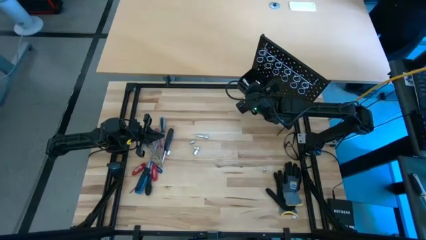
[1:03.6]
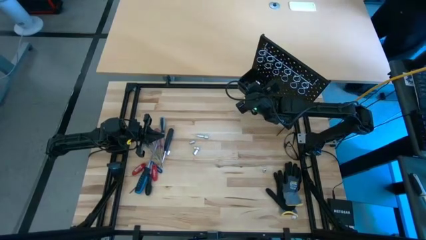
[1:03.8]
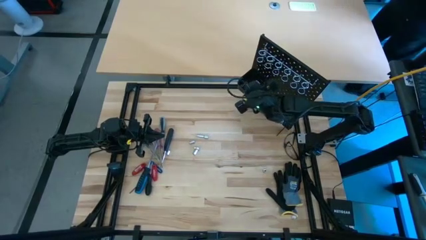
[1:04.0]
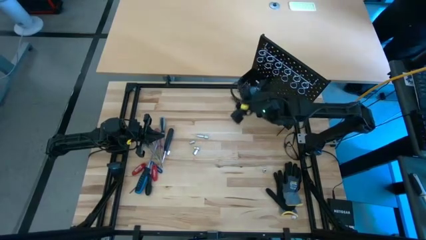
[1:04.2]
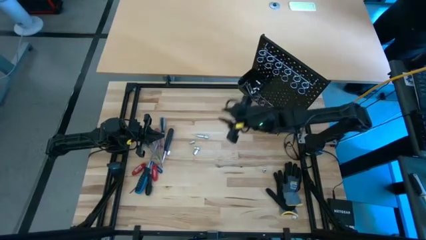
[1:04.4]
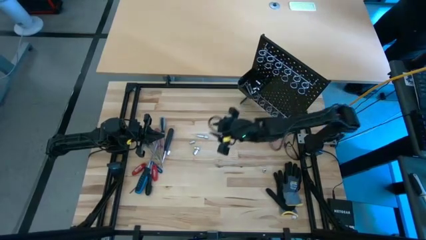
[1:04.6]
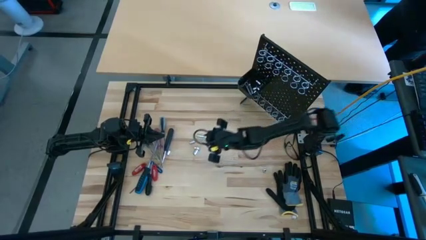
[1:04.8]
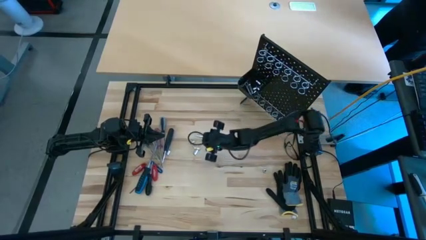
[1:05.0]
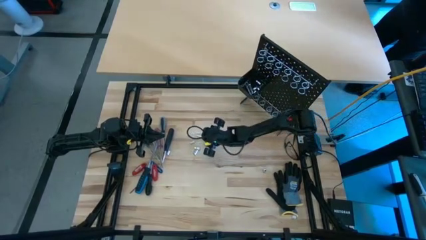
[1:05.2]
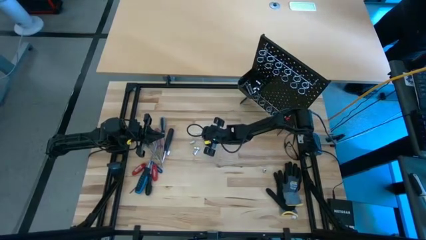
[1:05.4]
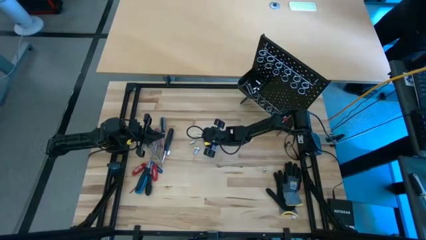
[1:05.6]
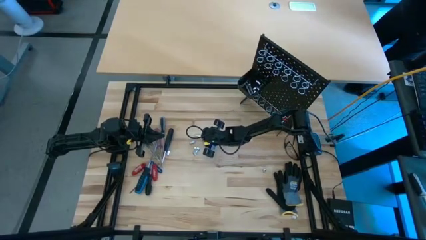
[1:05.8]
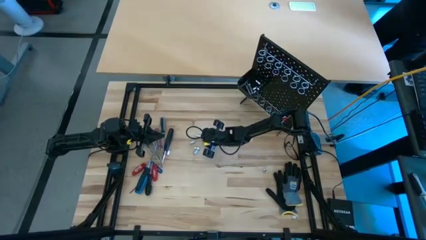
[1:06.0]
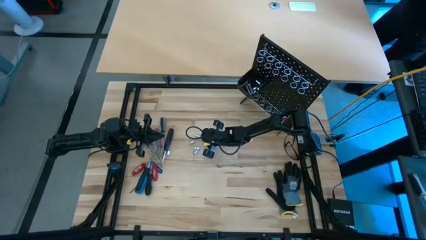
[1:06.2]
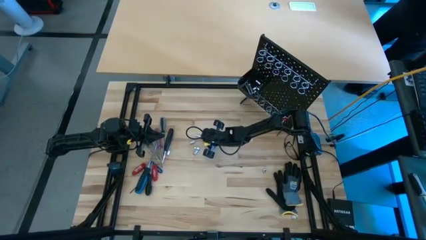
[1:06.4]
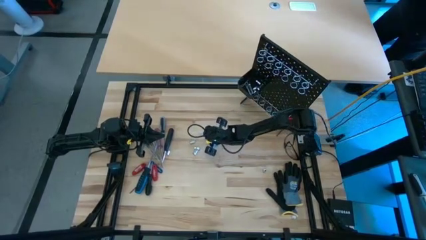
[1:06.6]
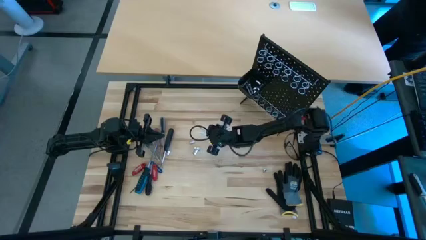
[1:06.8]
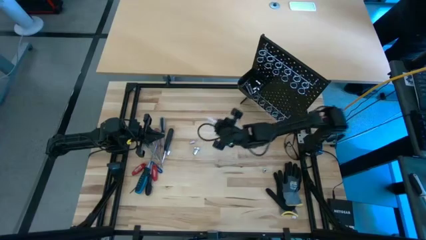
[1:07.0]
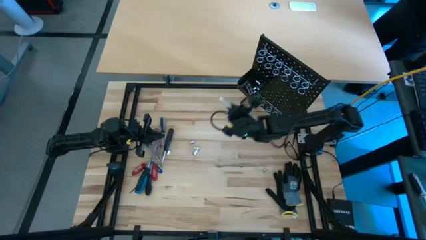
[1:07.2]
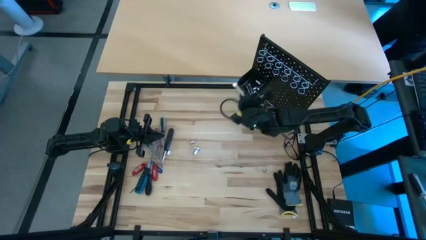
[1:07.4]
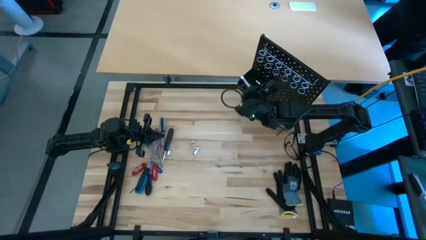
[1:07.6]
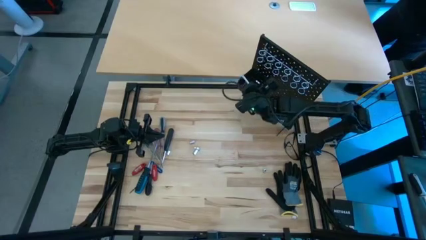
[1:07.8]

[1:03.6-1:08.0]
Task: Hang tools onto peg board
Put the extension bar into the black pegboard bin

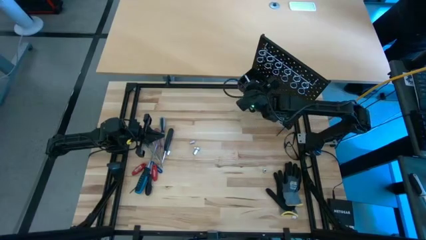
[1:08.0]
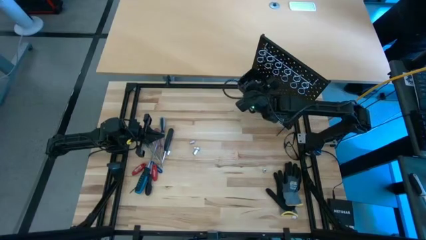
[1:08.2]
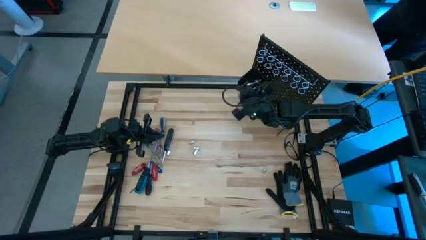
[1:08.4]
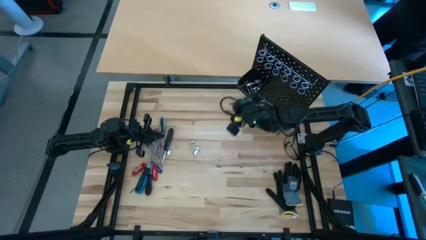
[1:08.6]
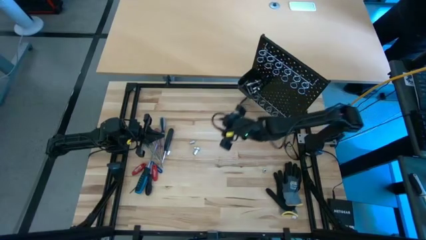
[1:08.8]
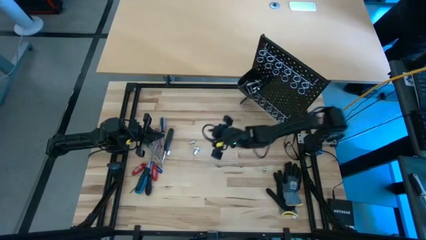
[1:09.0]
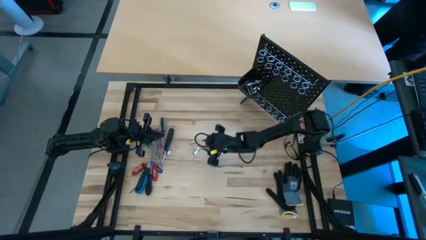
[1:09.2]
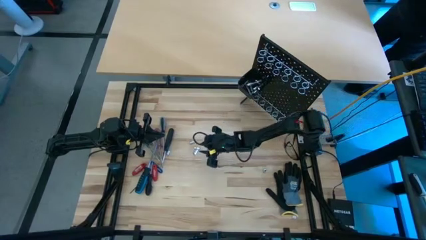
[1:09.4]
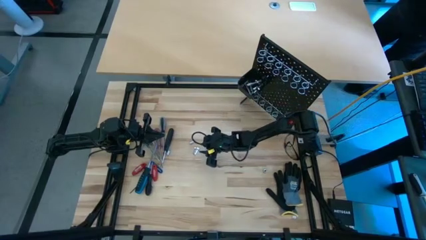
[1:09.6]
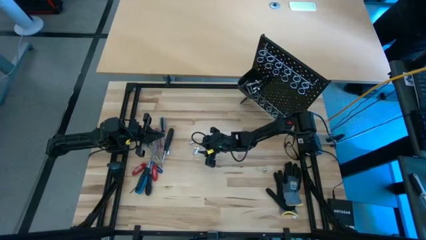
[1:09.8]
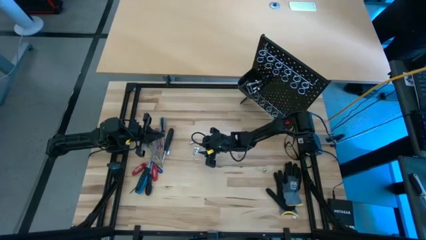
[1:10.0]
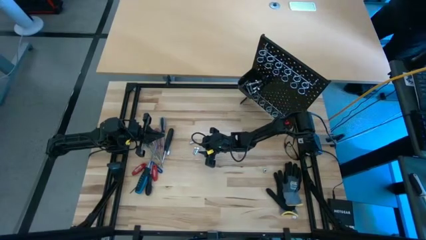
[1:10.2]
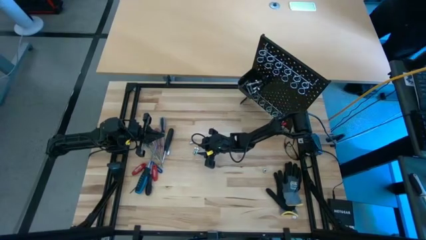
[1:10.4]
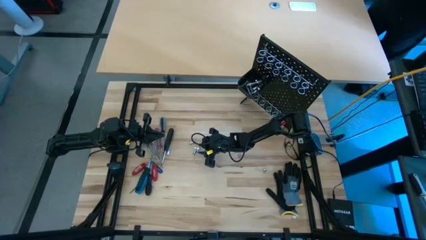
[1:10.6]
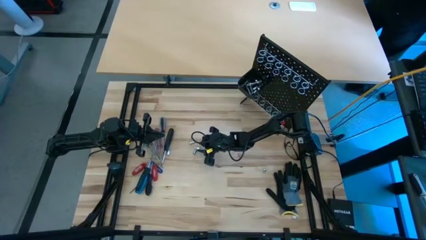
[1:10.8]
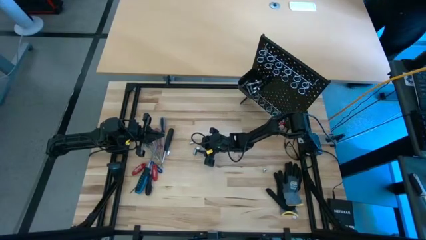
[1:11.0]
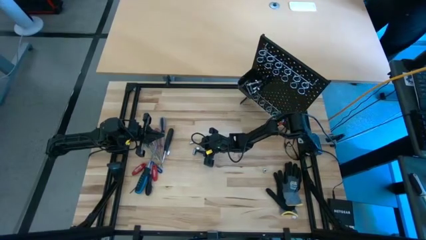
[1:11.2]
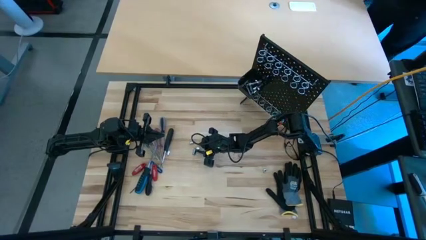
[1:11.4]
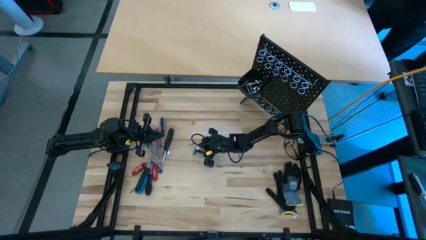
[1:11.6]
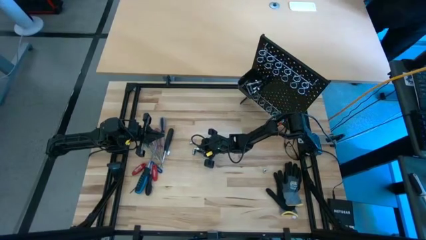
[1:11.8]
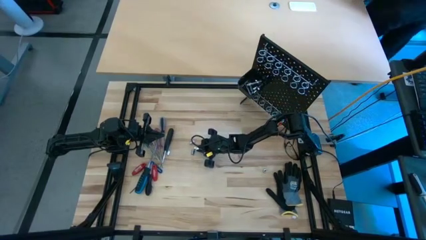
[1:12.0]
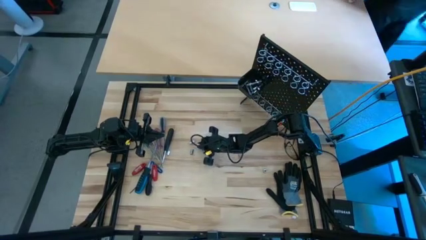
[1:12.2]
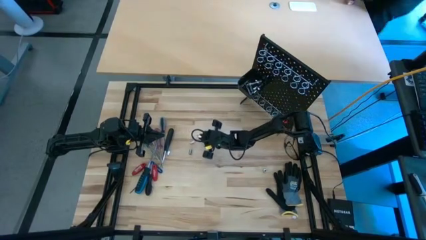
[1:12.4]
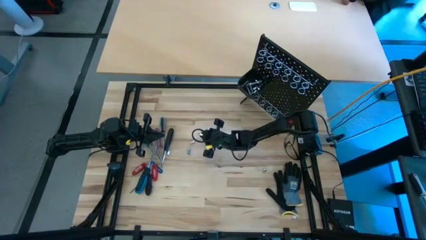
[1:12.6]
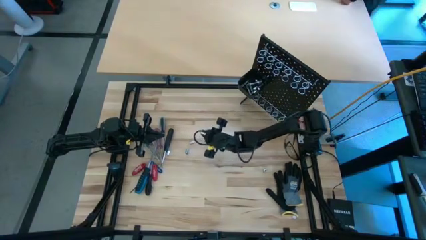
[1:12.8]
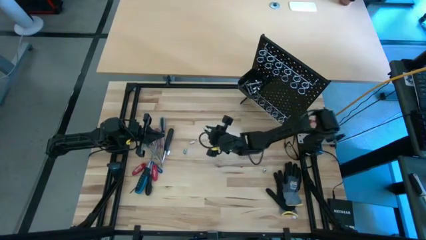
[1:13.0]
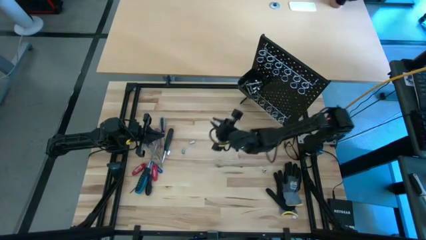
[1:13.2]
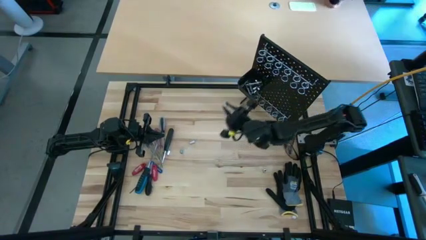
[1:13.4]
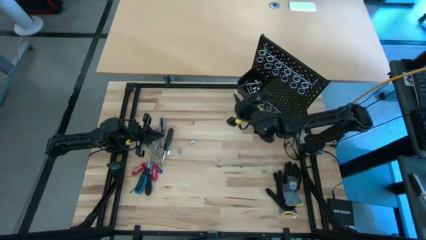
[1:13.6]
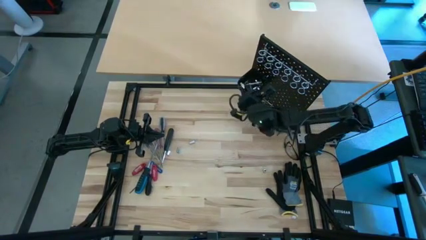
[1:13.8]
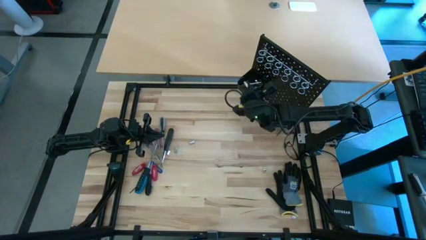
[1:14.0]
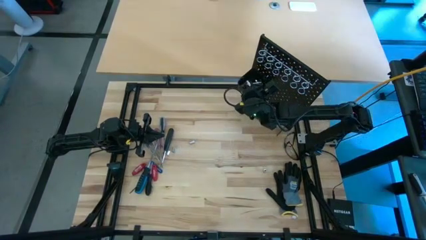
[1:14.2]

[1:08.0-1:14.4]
Put the socket into the black pegboard bin

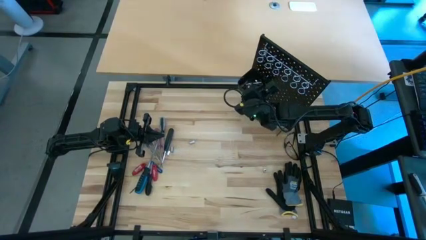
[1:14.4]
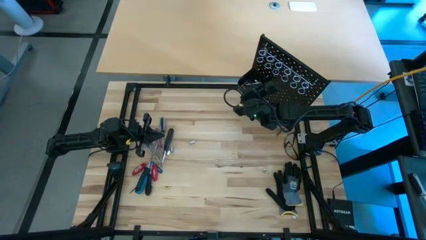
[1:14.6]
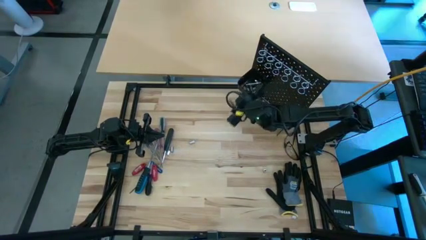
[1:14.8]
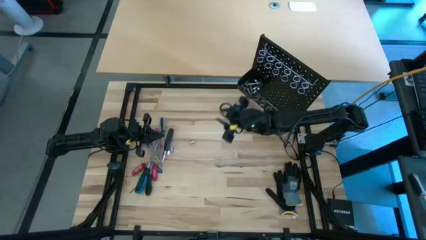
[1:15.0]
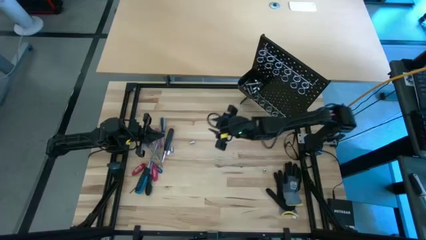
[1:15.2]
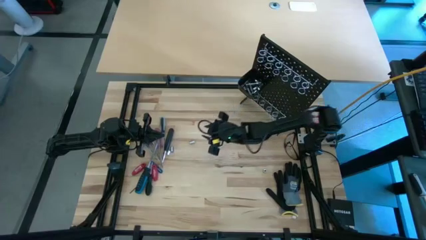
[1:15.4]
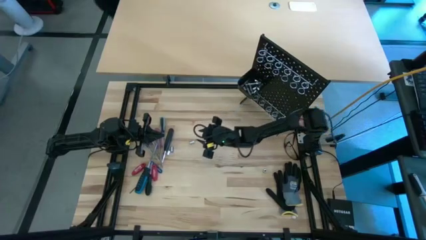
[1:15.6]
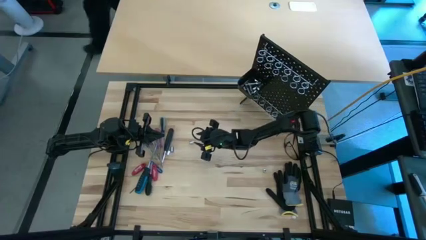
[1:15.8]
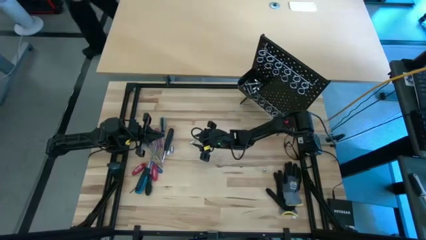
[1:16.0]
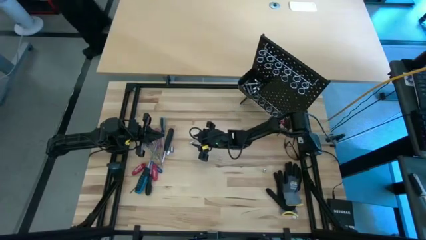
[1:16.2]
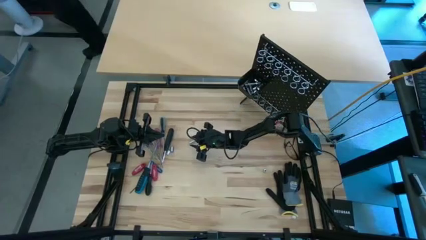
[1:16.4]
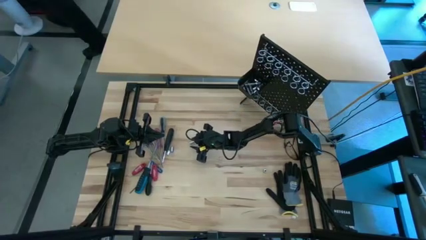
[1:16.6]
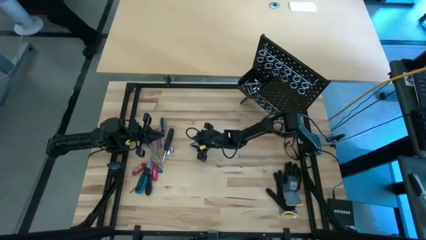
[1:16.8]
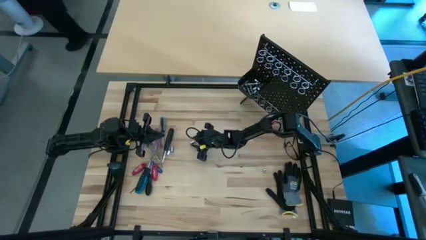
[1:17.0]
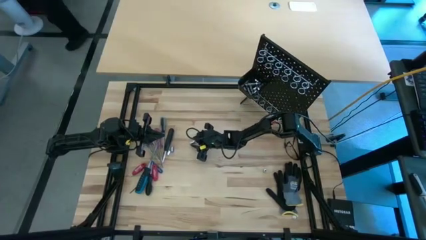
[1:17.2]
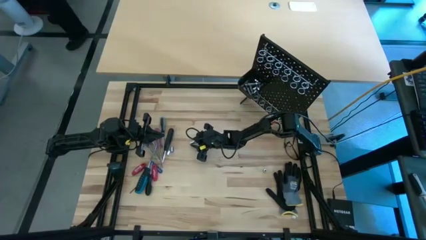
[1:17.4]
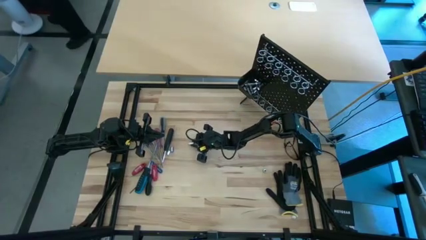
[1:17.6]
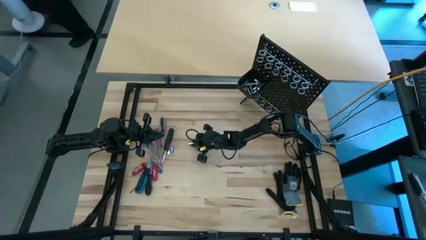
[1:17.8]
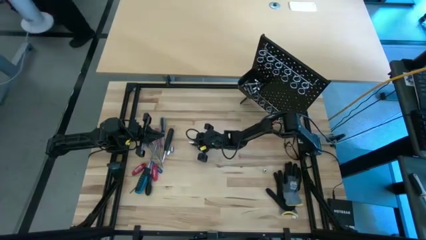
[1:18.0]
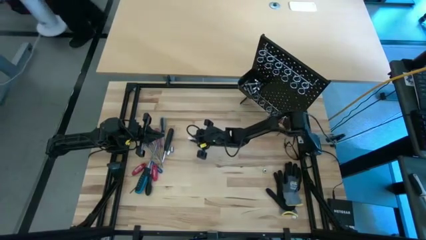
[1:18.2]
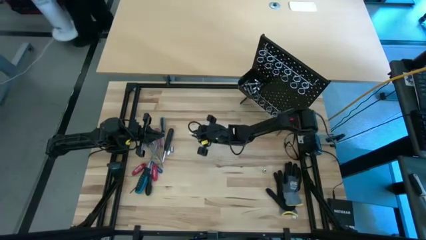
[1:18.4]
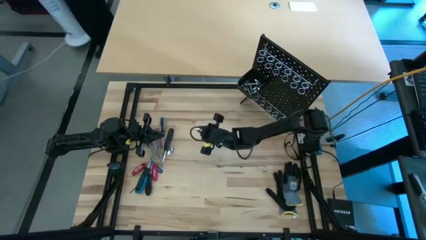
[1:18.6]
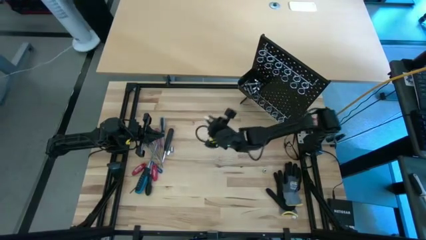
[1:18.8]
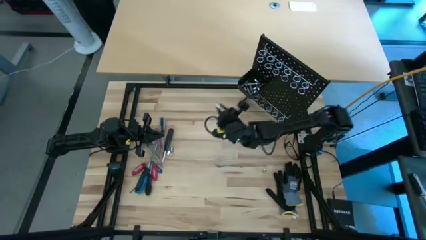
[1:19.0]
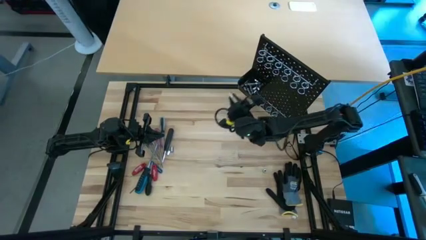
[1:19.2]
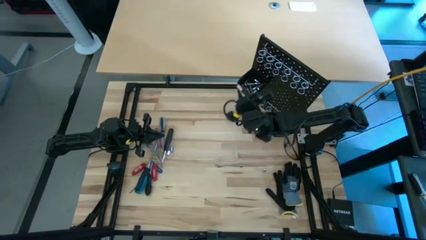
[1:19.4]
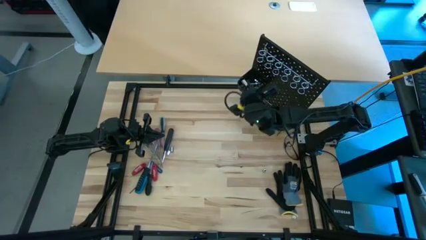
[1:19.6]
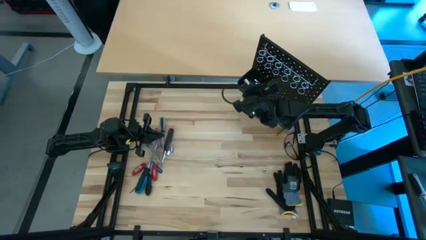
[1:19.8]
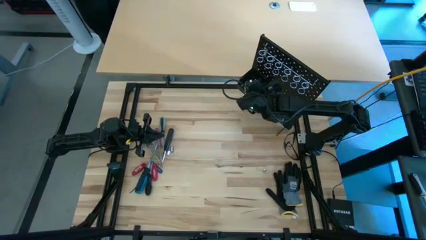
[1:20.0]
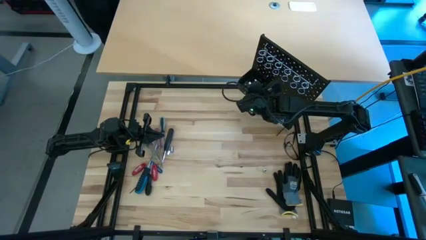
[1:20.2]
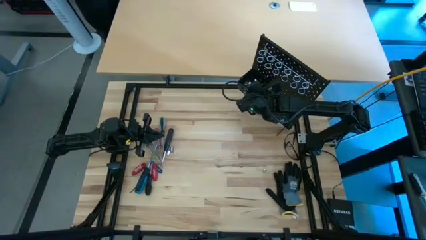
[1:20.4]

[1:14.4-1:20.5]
Put the socket into the black pegboard bin
